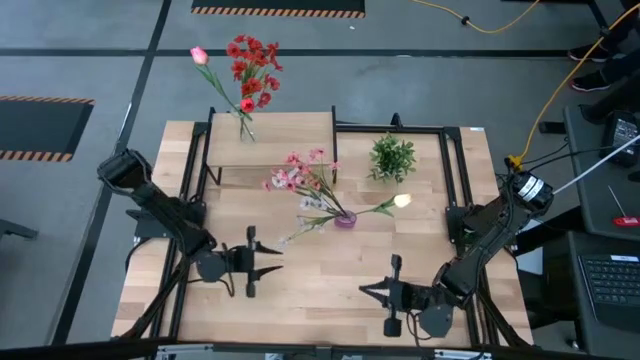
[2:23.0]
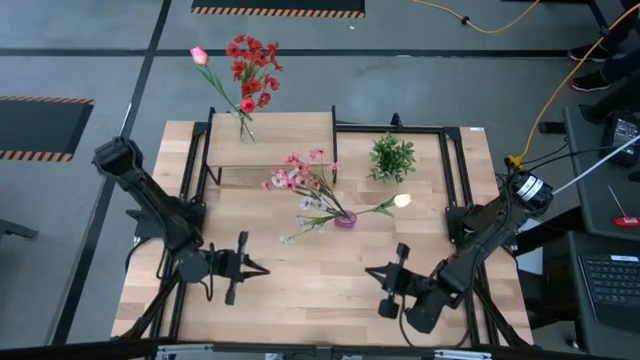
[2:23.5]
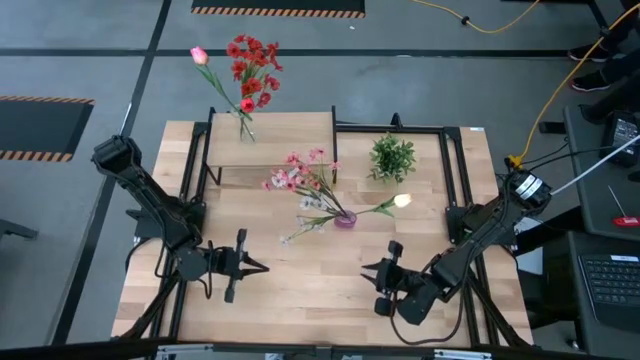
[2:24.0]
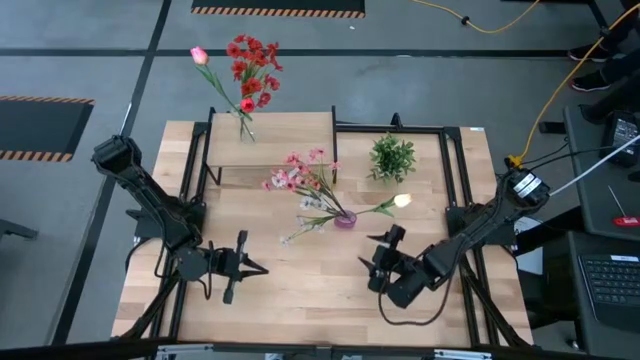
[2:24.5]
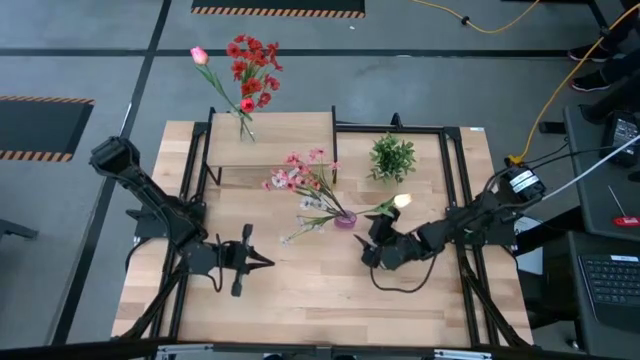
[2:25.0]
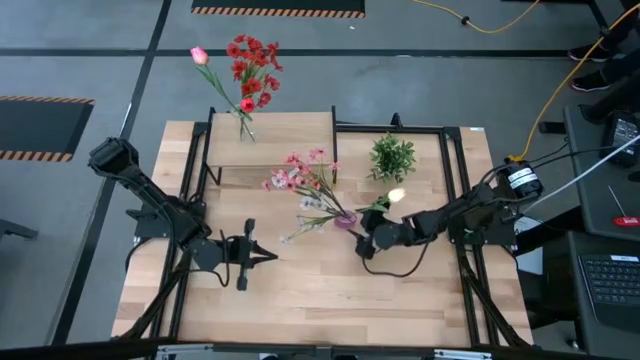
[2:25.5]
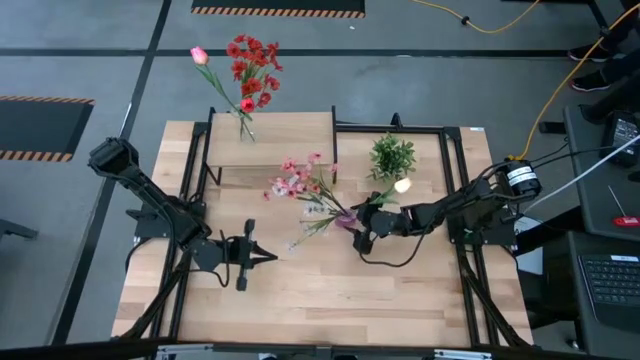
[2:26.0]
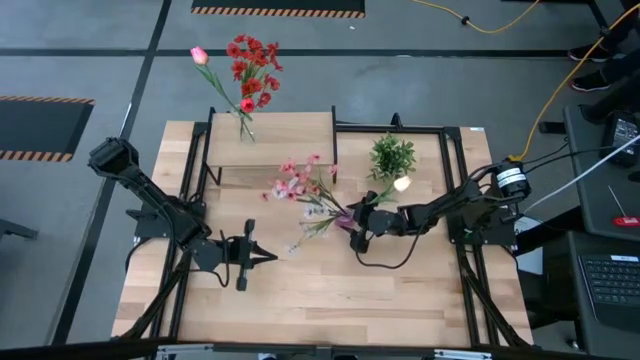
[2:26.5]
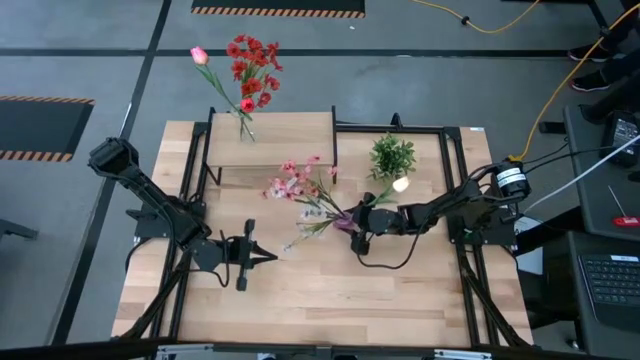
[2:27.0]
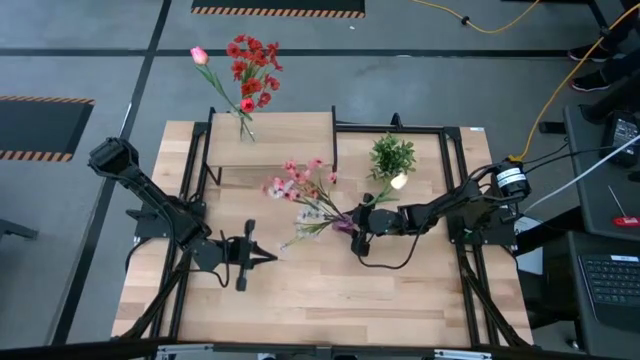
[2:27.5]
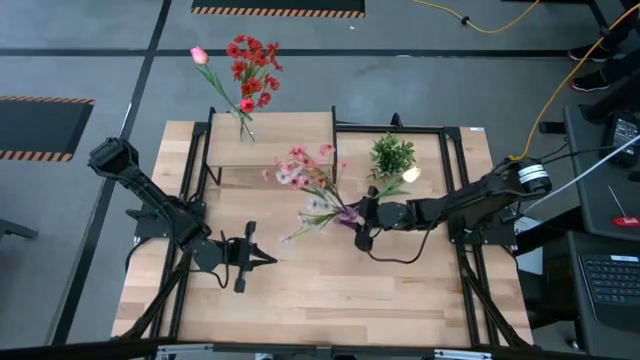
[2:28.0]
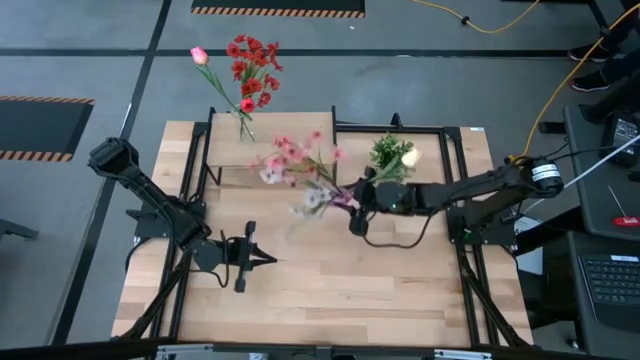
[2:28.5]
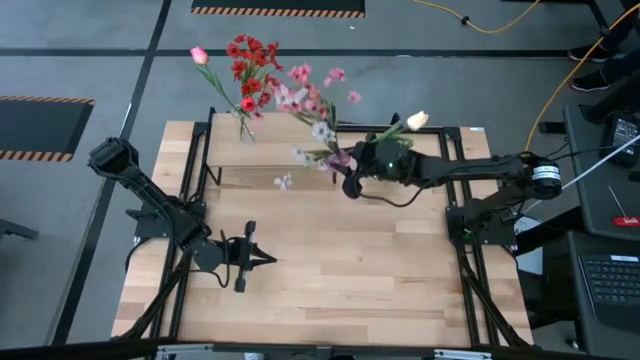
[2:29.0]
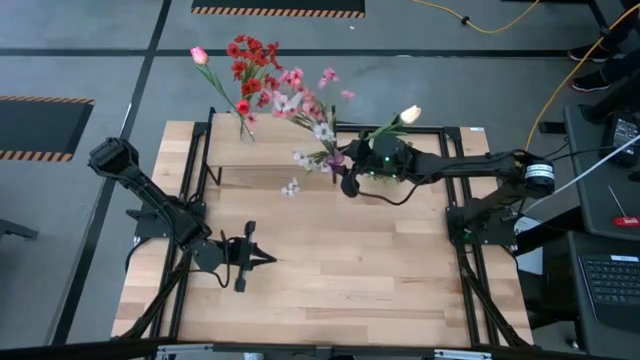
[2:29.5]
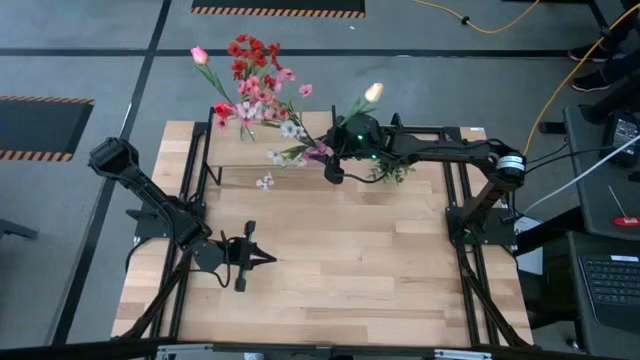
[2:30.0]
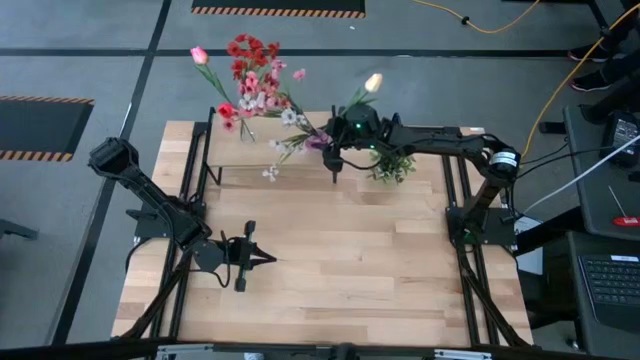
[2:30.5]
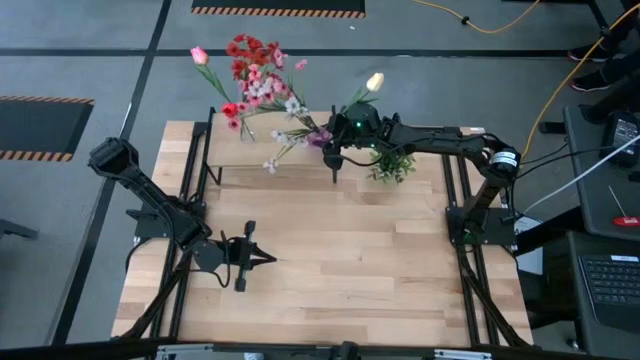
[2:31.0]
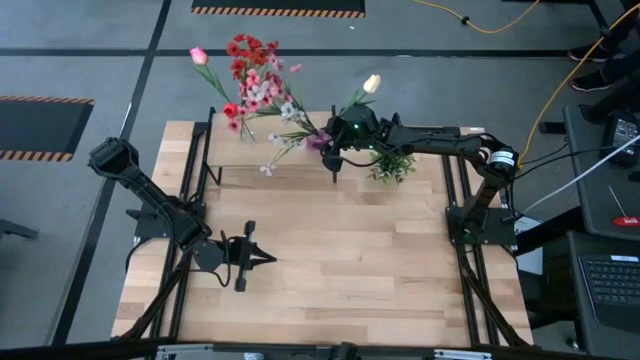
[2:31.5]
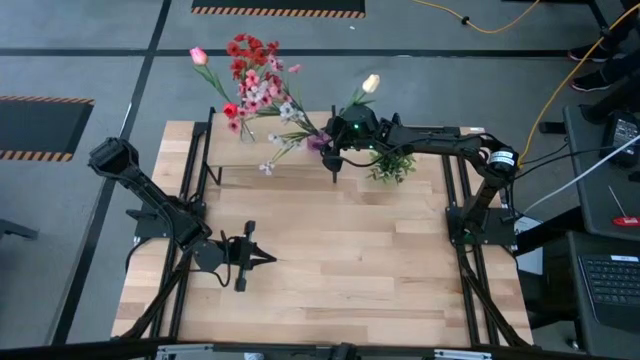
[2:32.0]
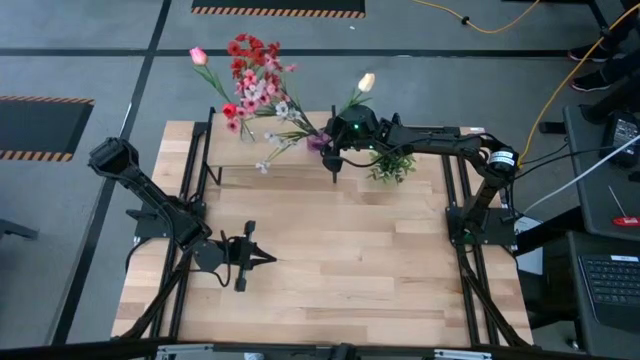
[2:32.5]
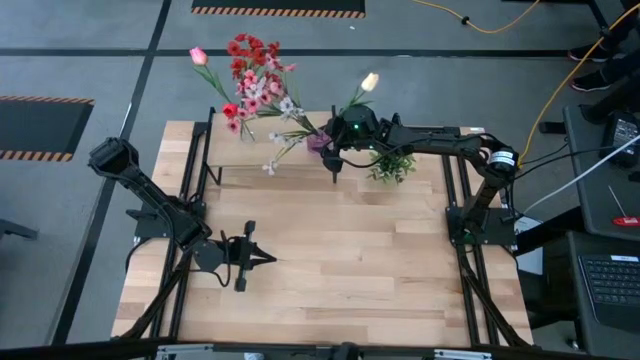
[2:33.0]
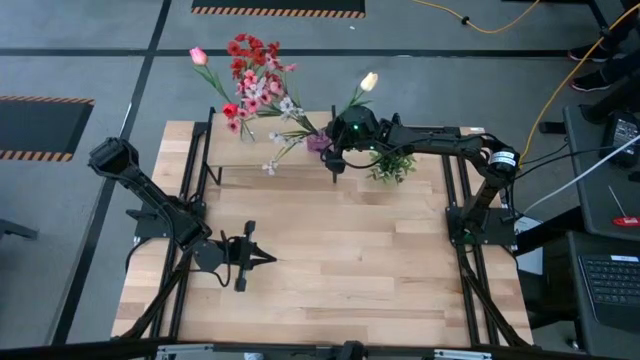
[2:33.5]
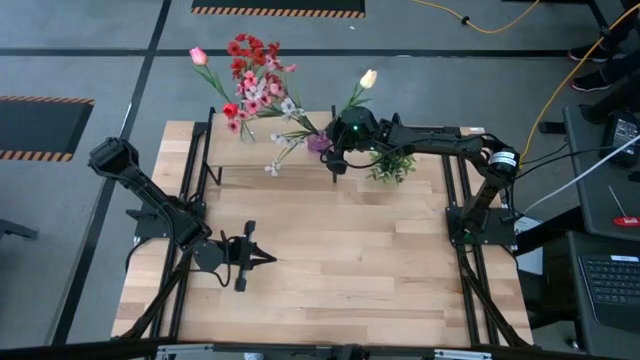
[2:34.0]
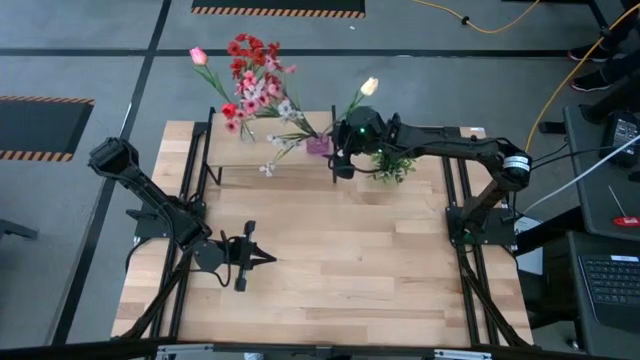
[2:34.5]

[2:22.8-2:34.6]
Task: Pick and place flowers into a vace then onto a shelf
Put the violet vase on the shelf

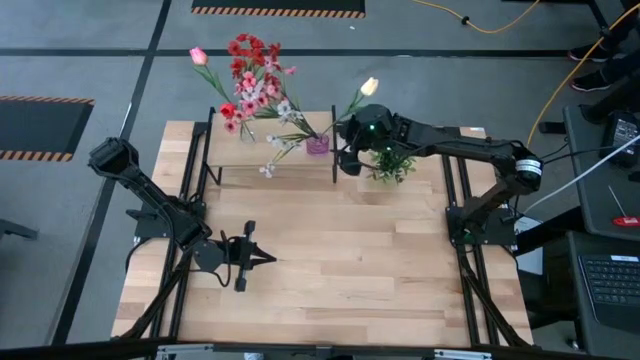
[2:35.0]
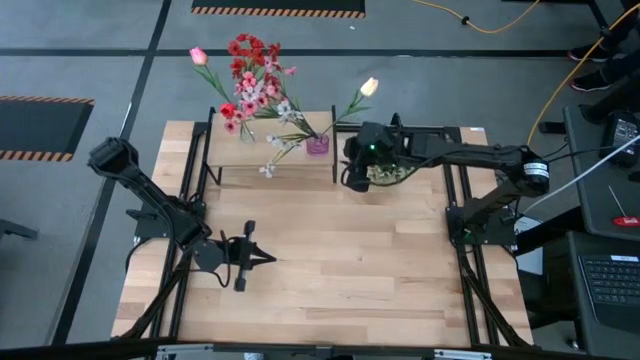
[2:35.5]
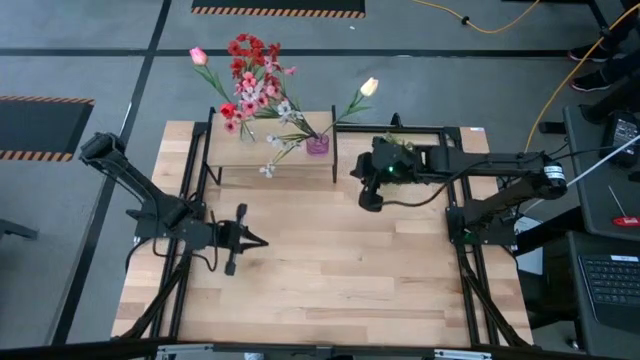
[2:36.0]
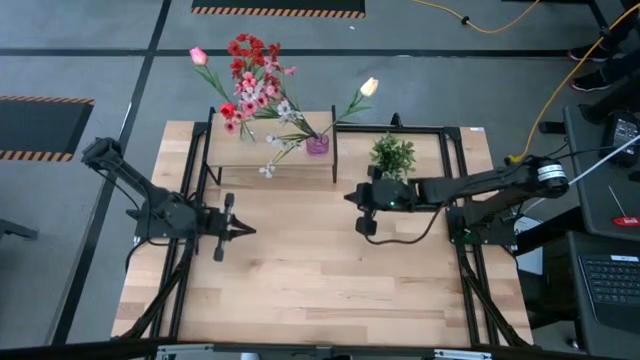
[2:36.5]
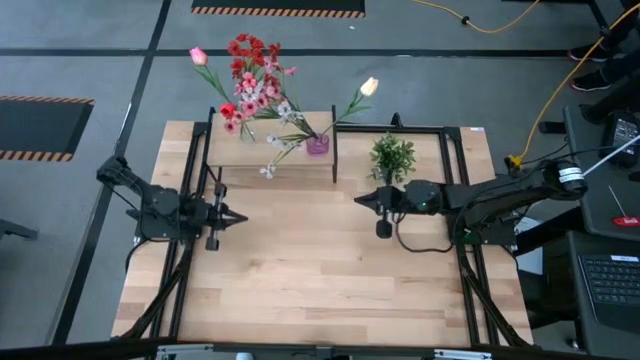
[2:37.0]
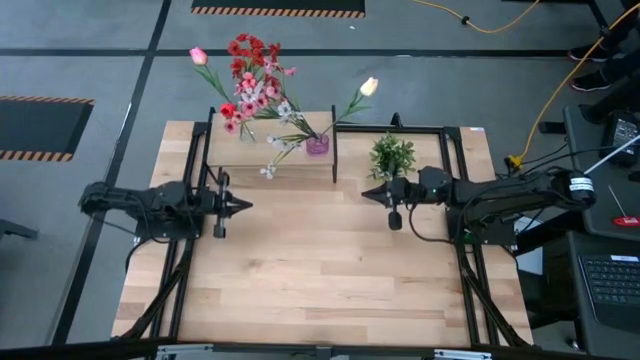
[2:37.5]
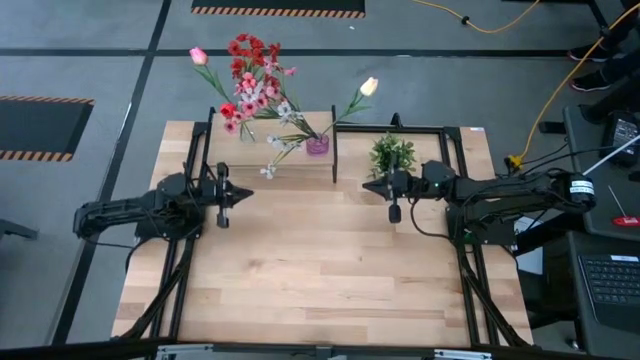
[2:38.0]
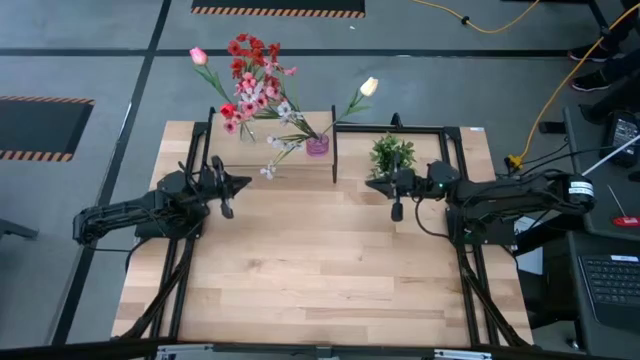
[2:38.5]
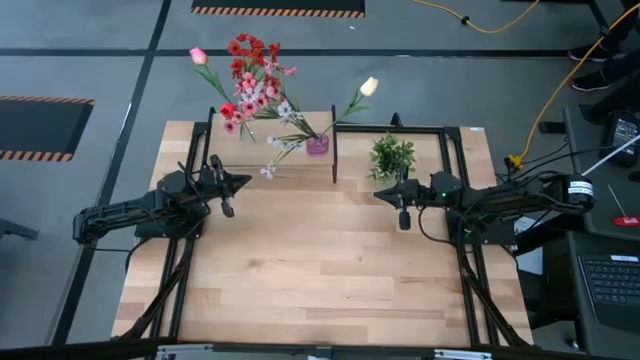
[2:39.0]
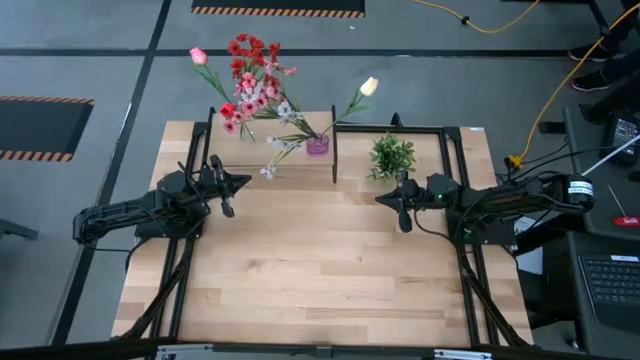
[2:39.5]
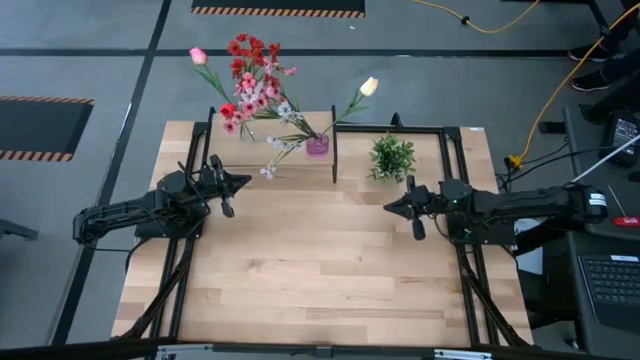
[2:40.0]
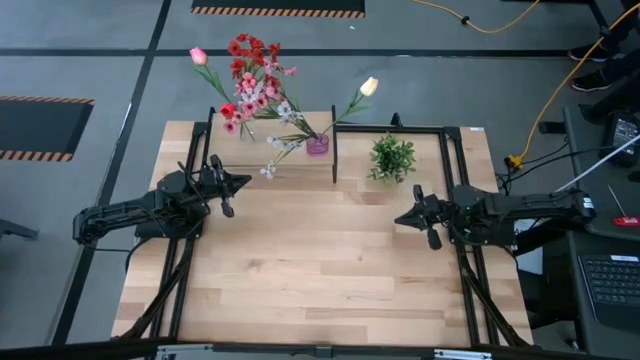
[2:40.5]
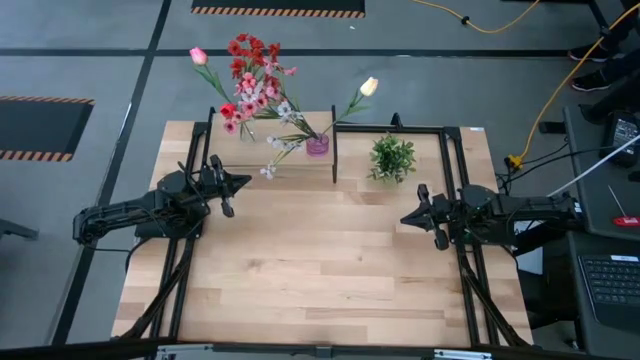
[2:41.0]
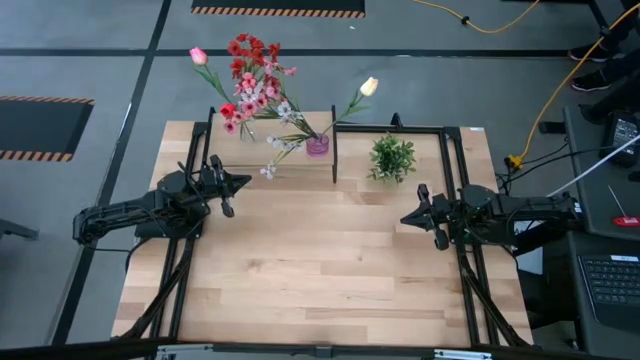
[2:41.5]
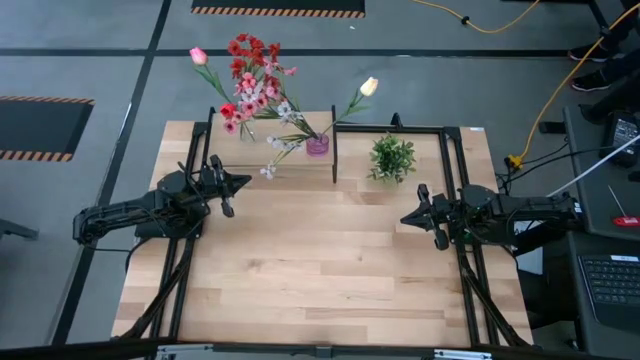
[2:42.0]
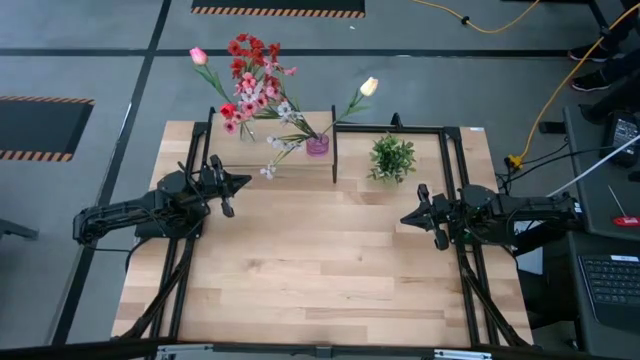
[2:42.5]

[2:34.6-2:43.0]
Return to Home Position

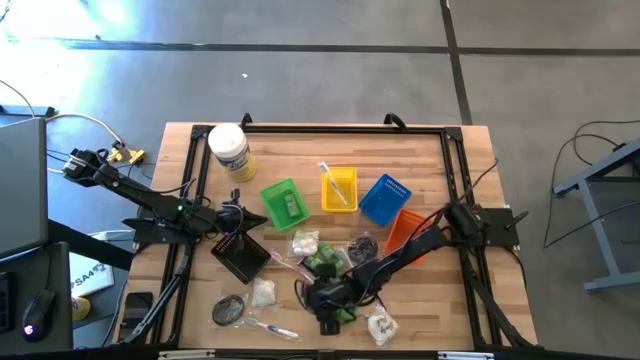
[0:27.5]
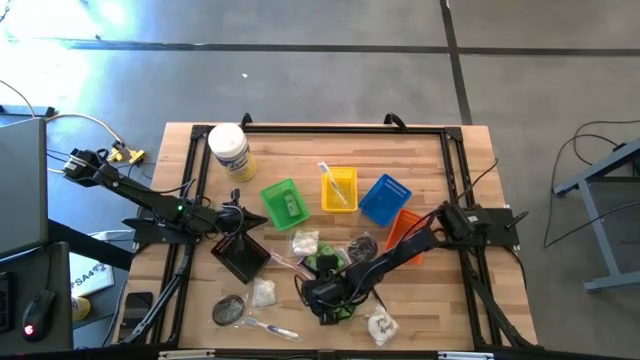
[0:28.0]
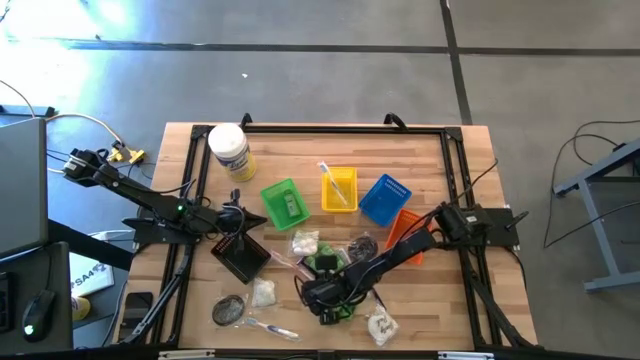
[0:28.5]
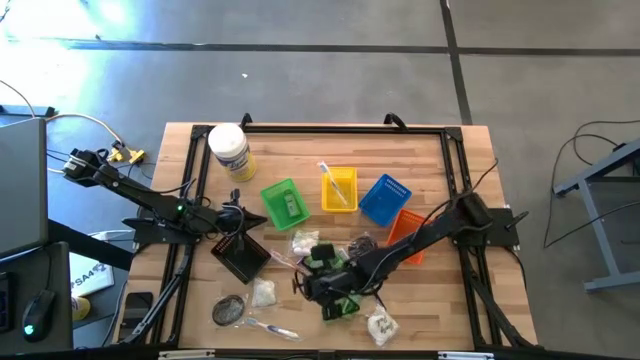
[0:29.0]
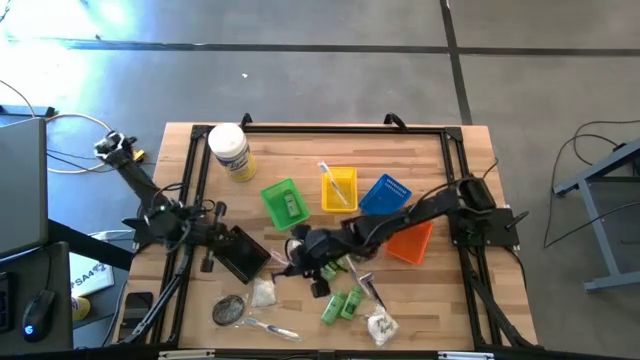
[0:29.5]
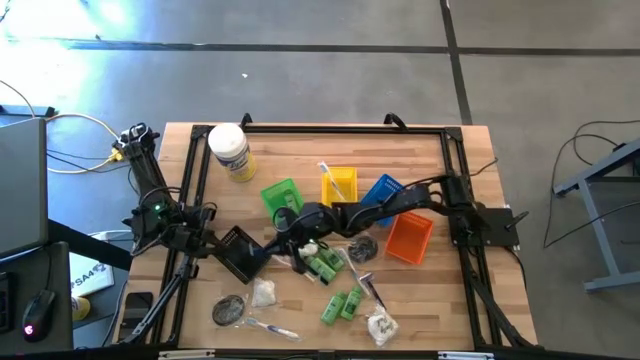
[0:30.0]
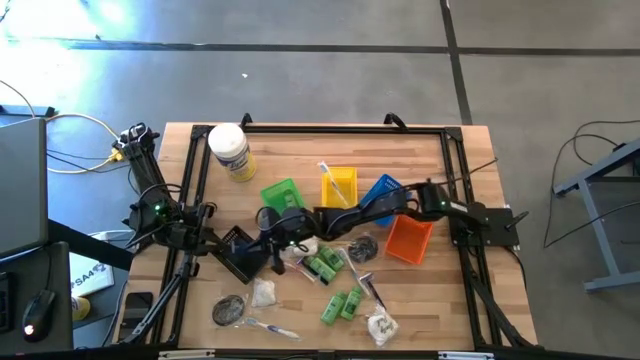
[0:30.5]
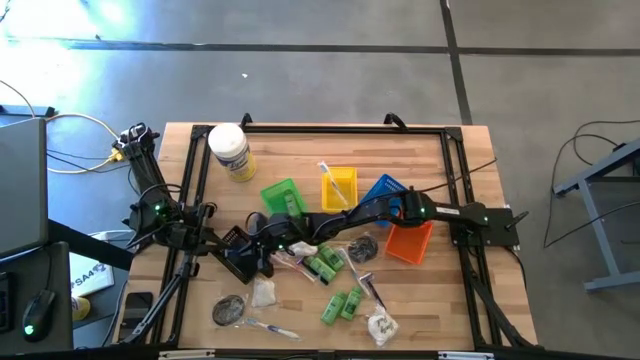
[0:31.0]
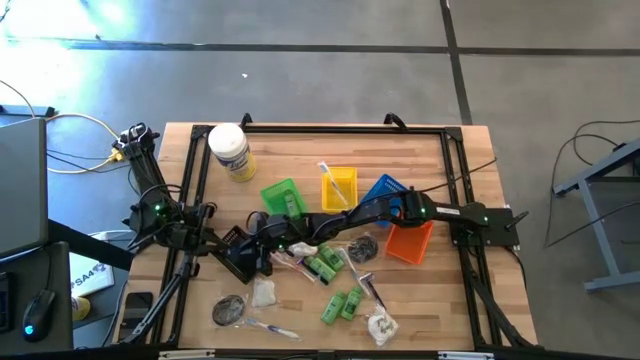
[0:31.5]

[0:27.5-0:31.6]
Task: Pick & Place Travel size toiletries
Put the bottom left razor into the black bin
